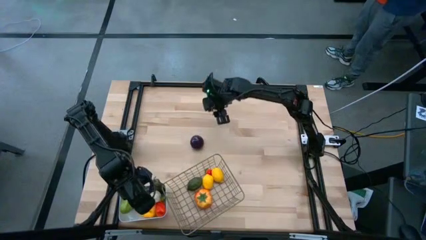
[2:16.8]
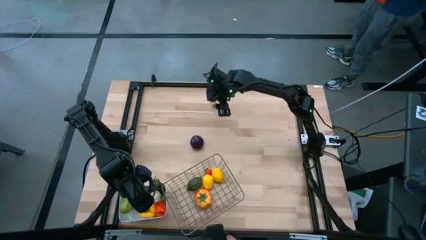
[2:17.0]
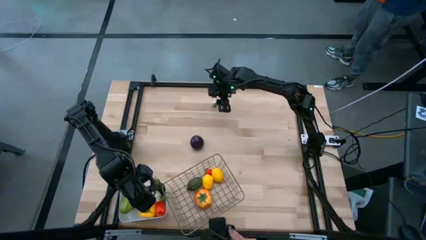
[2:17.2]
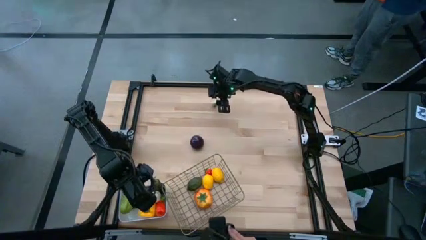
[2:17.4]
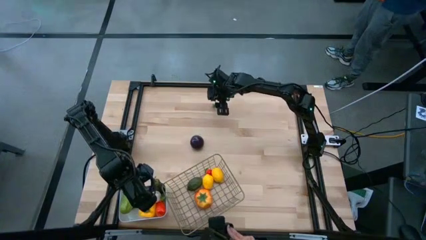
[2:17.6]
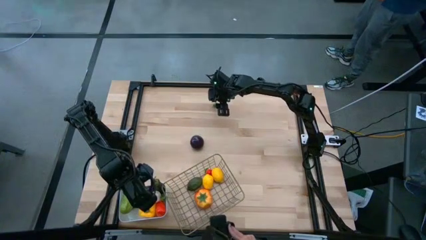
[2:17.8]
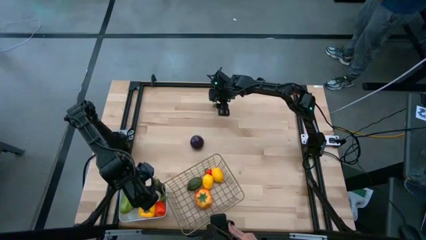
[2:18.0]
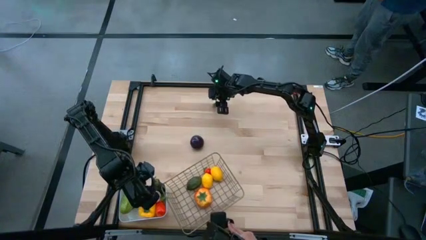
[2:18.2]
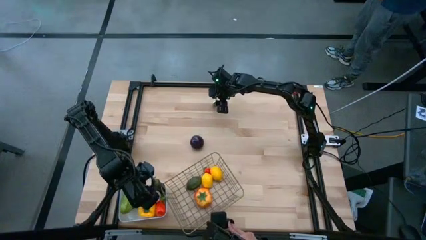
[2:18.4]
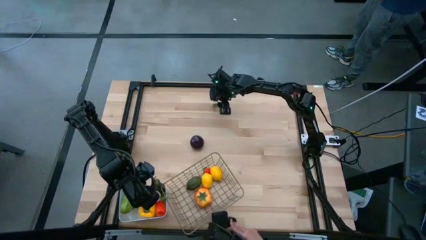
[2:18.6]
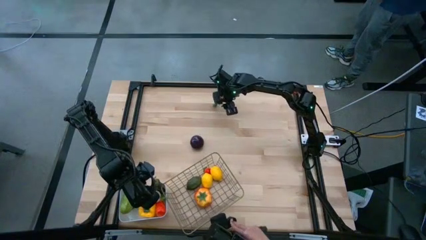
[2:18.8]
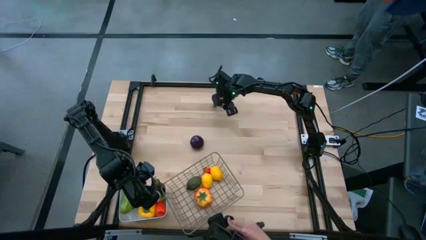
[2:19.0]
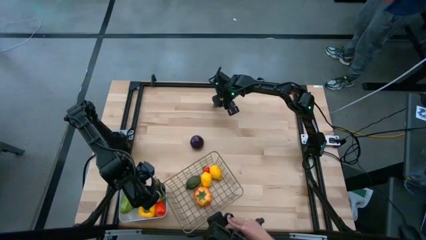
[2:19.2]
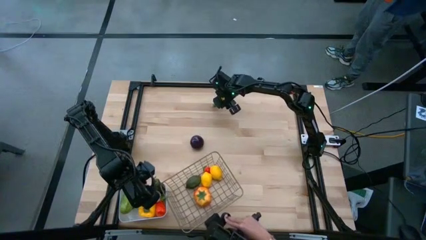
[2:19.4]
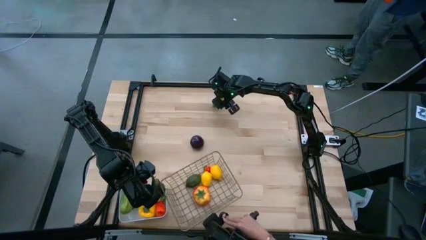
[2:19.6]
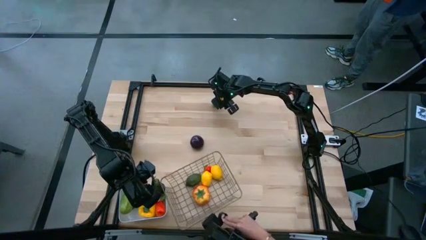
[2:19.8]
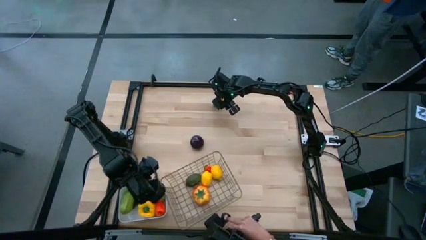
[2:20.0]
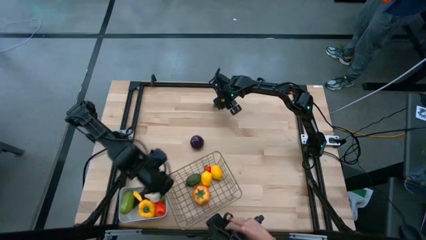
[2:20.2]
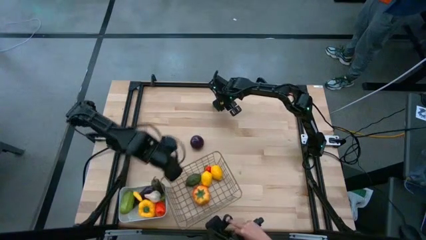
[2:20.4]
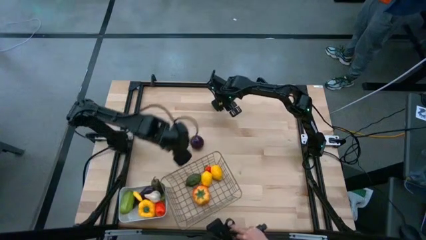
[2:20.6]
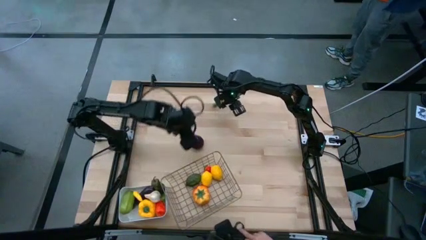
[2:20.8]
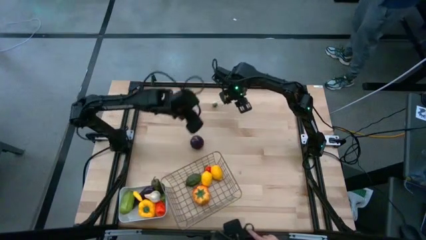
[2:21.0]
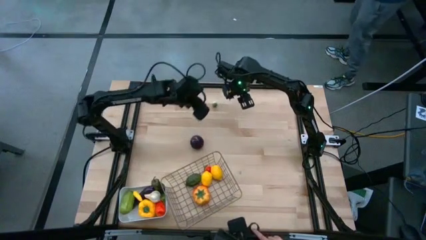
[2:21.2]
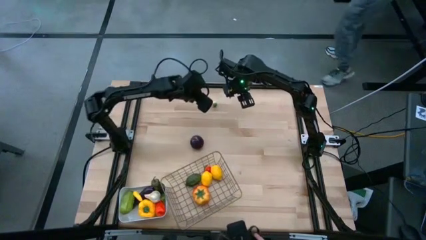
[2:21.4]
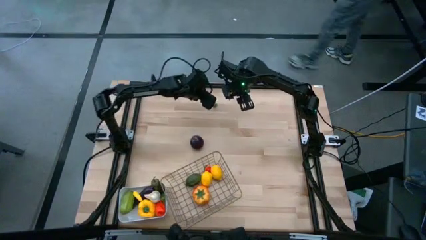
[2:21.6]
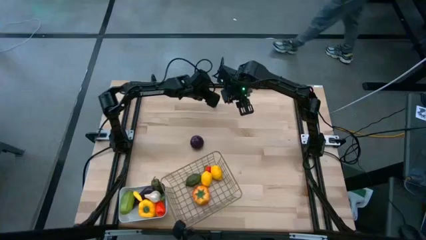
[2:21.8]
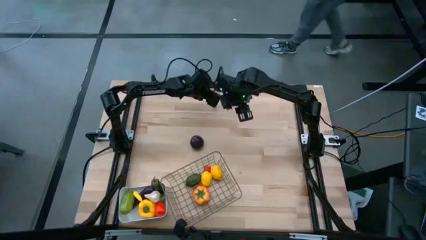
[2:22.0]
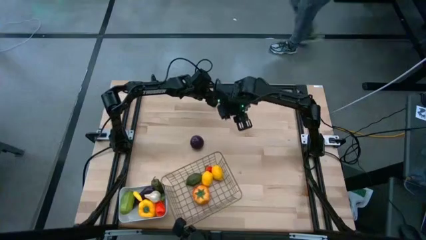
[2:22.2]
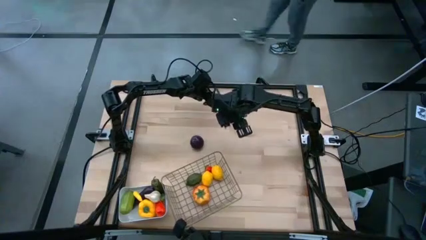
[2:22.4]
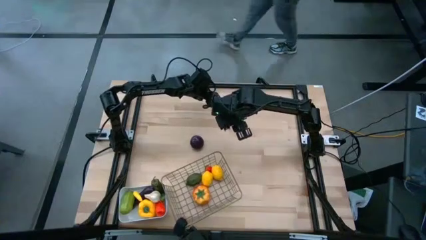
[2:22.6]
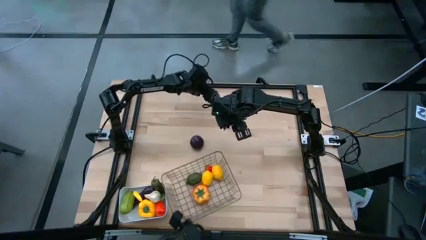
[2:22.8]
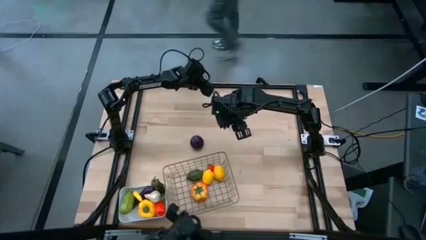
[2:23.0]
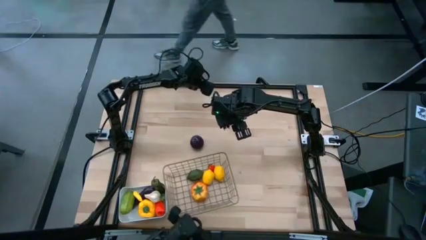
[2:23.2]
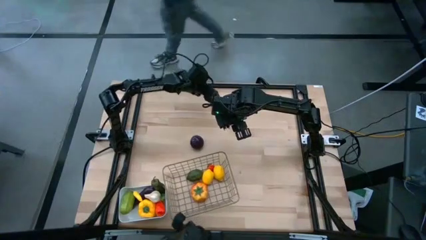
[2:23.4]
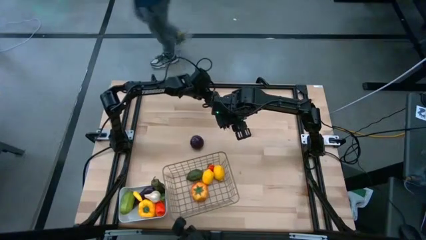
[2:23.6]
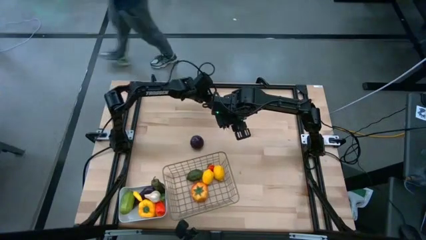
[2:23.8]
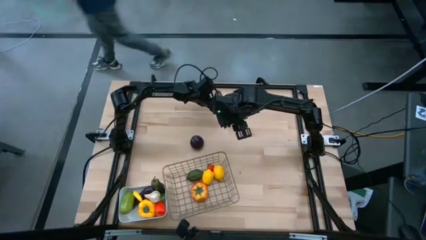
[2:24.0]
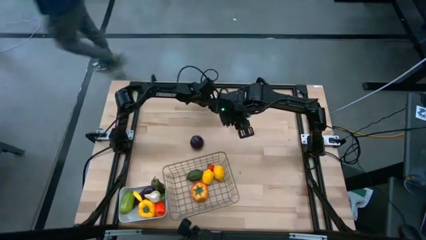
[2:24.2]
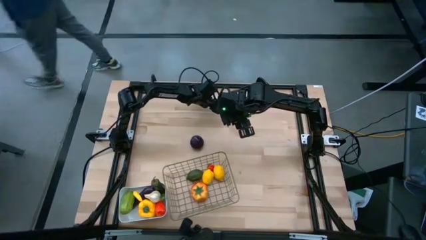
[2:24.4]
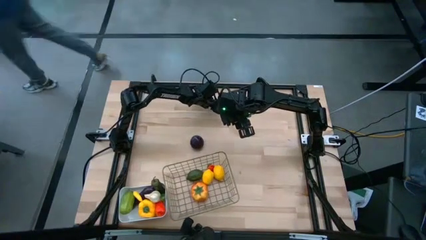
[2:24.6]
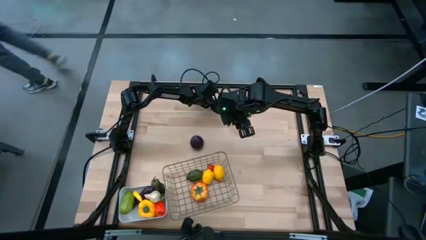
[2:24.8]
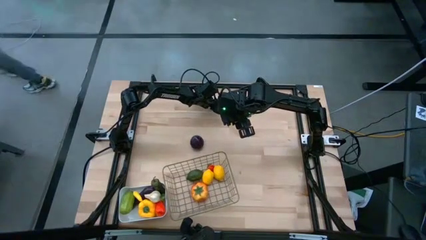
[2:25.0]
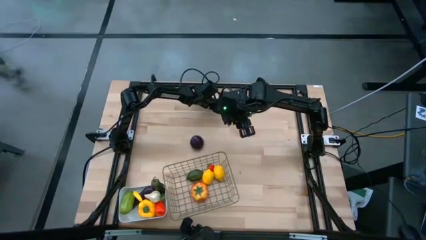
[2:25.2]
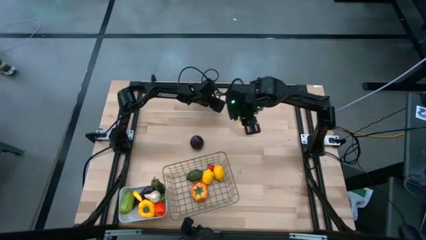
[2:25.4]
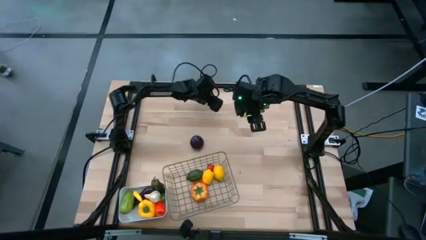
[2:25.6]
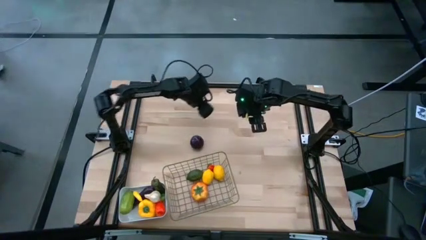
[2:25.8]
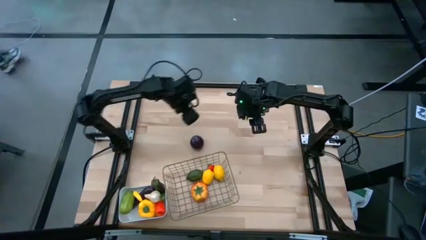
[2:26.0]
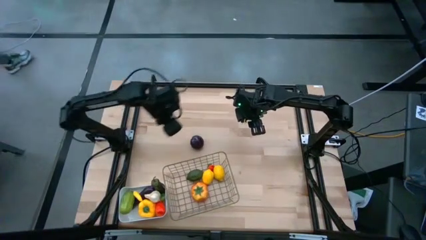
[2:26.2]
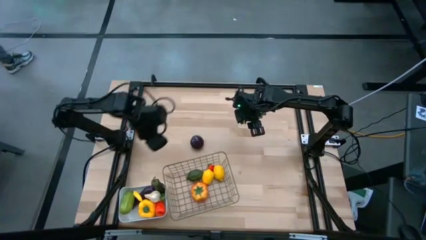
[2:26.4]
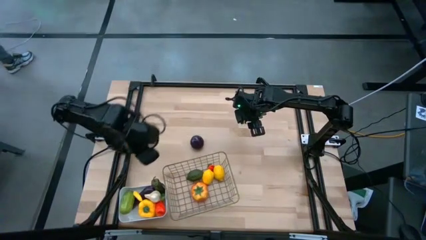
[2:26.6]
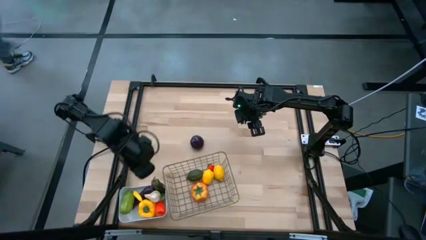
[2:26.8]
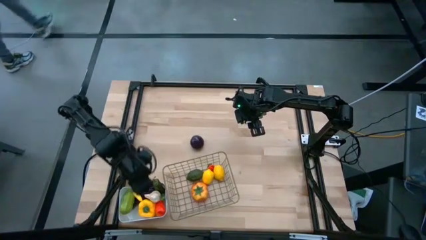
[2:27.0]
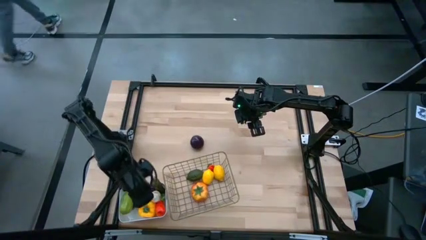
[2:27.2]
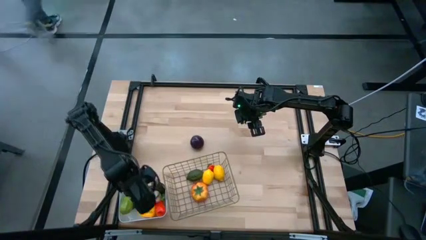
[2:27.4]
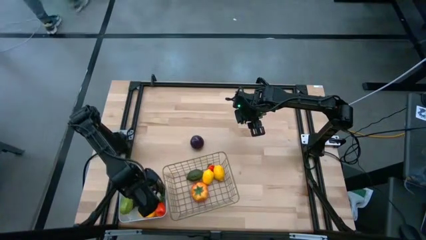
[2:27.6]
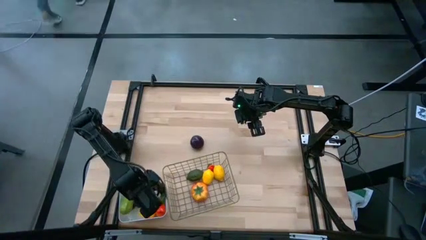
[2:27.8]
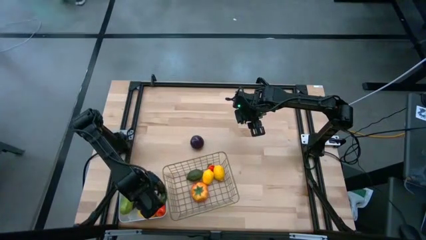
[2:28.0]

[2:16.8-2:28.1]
Task: Sort produce into baskets
Put the light green mushroom into the white bin

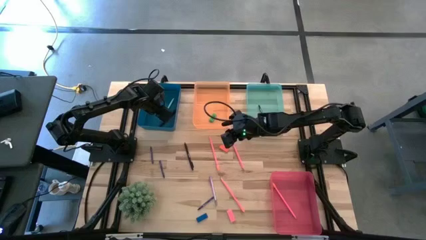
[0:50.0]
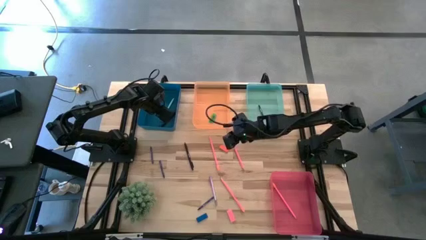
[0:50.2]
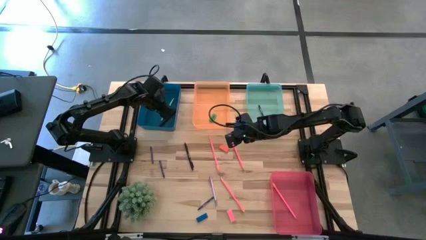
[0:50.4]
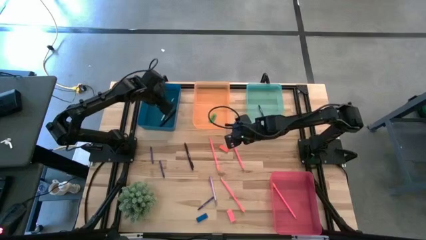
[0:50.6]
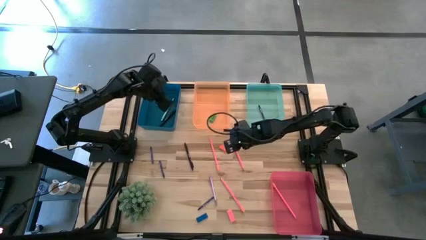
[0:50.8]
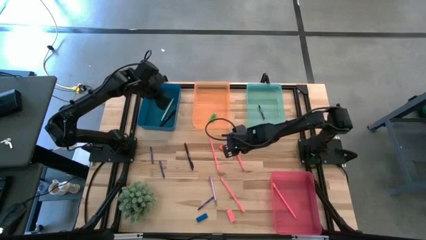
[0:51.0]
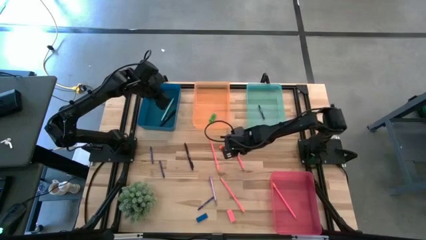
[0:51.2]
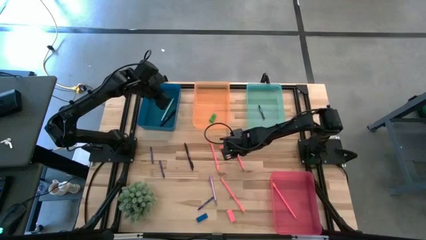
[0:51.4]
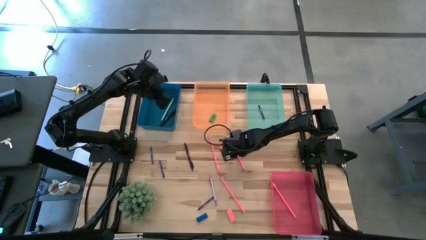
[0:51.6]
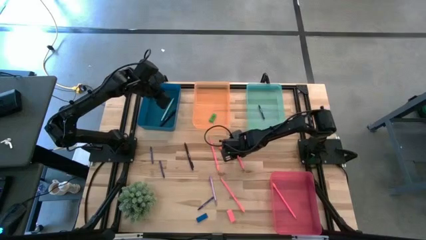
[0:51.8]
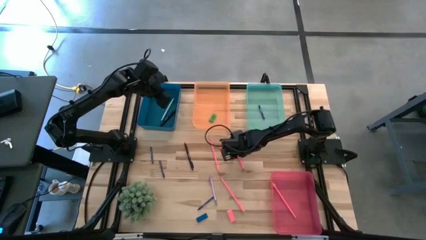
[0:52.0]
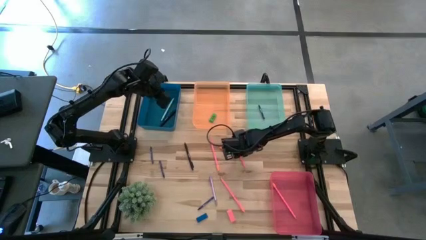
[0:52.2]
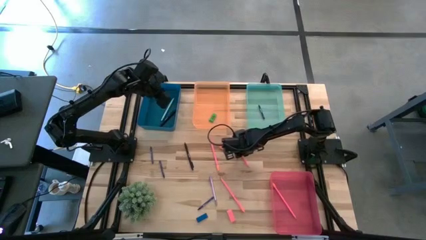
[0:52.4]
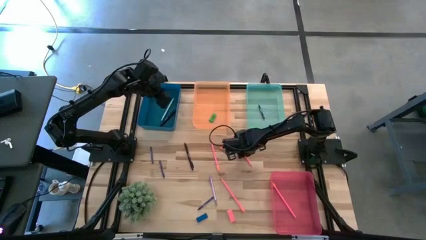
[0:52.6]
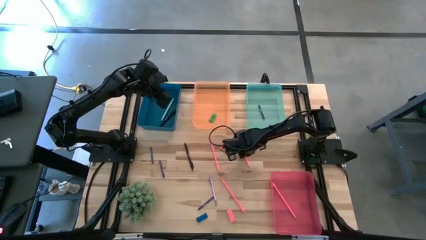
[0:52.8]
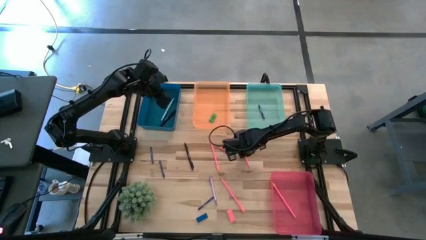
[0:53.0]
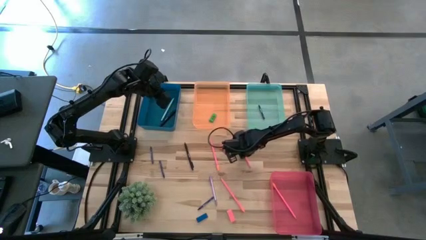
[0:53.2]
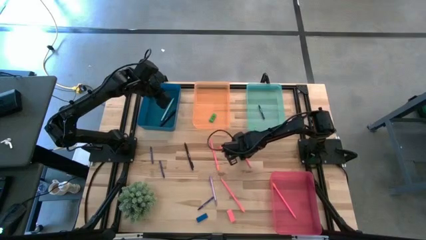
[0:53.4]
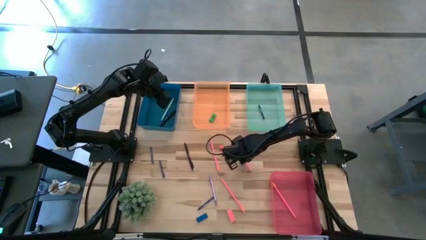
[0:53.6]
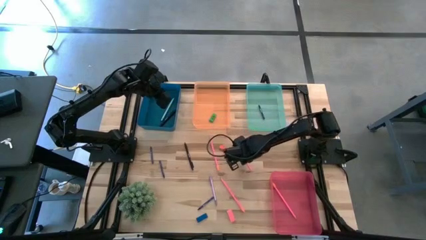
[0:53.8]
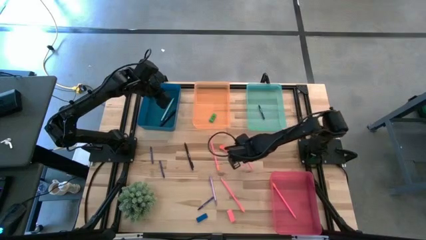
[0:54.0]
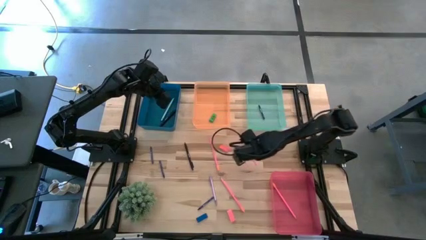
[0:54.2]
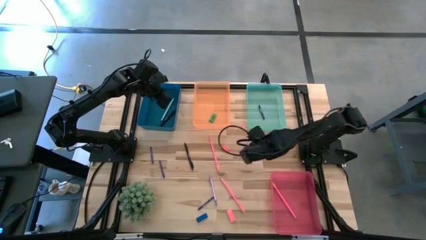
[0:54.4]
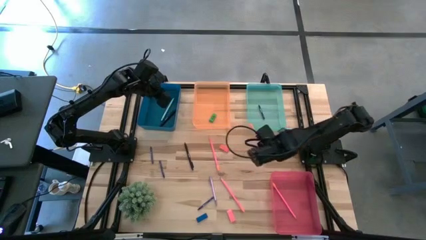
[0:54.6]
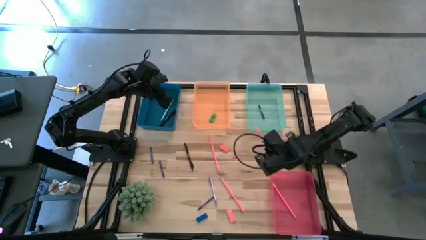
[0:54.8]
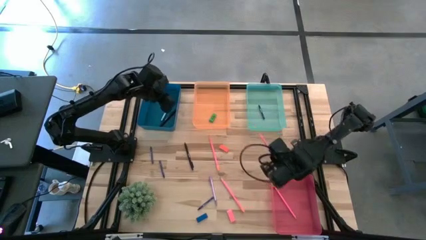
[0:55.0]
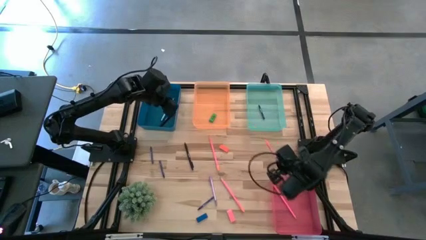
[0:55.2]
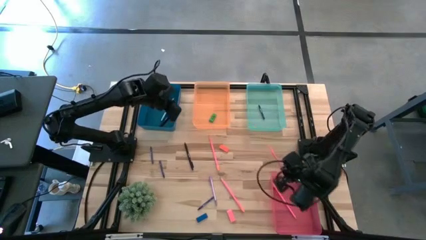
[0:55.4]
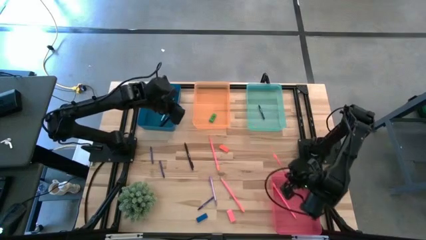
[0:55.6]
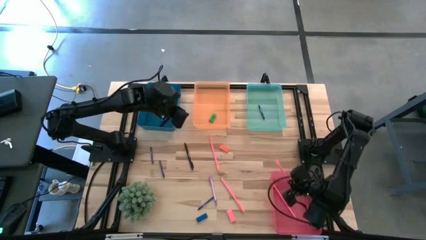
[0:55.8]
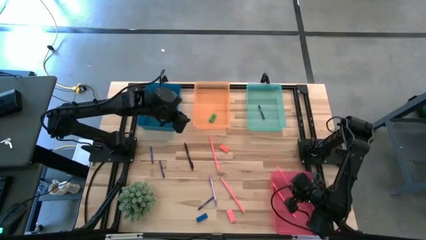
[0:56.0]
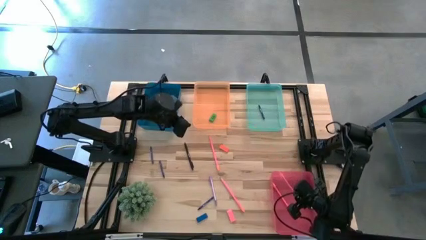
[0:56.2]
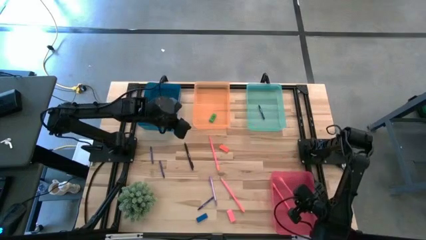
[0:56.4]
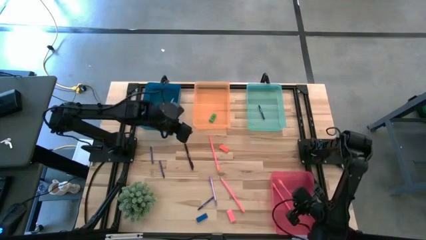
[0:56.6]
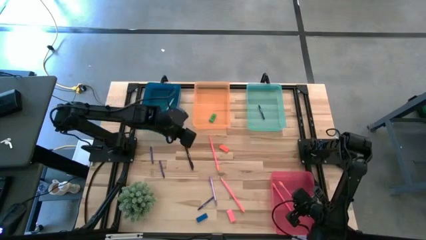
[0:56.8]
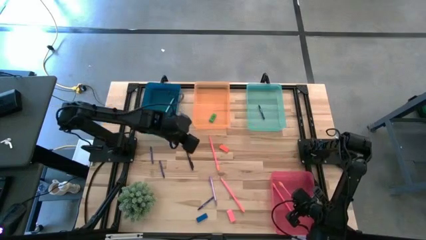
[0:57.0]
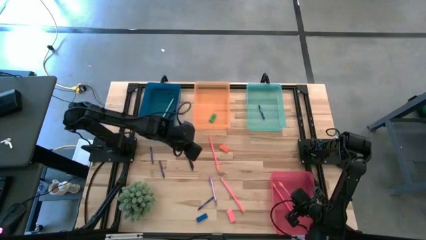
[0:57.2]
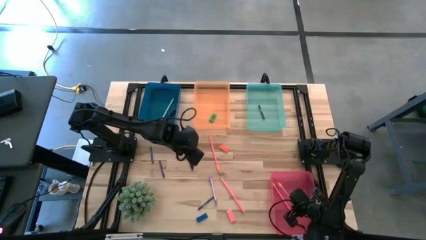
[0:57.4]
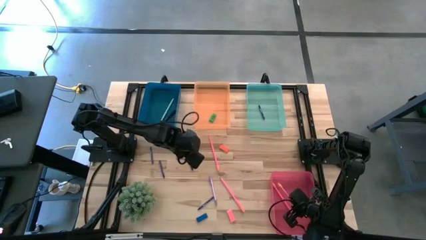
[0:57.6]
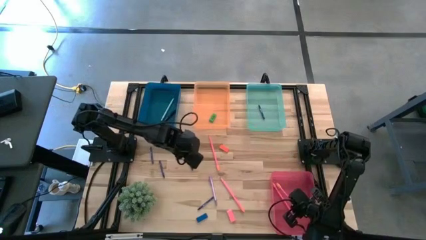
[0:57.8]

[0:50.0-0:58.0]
Task: Sort crayons/erasers/pens/pencils in bins
Put the pink colored pencil into the pink bin
